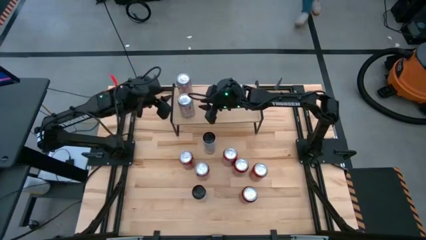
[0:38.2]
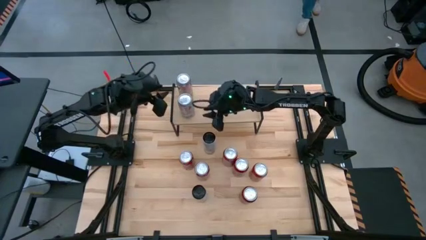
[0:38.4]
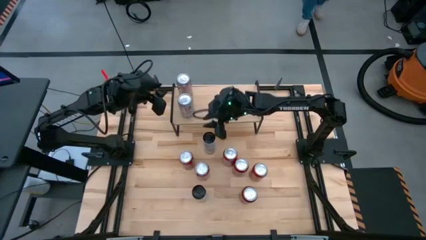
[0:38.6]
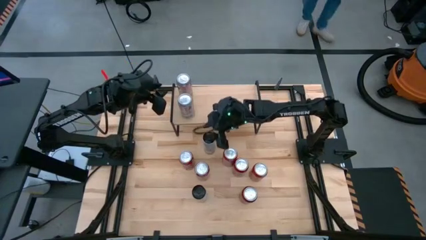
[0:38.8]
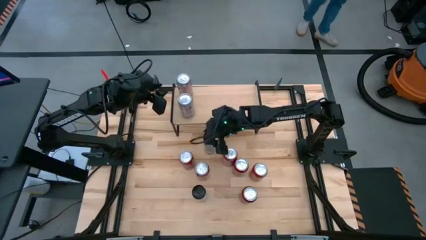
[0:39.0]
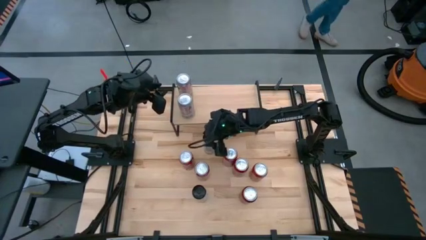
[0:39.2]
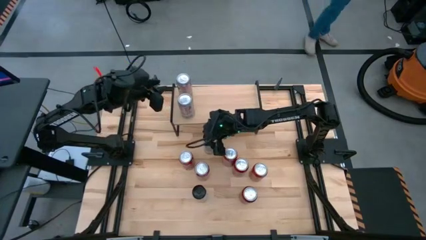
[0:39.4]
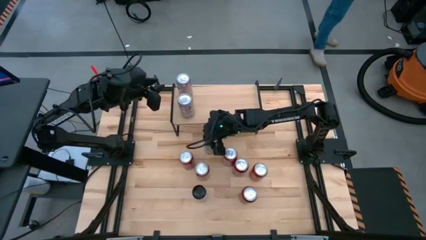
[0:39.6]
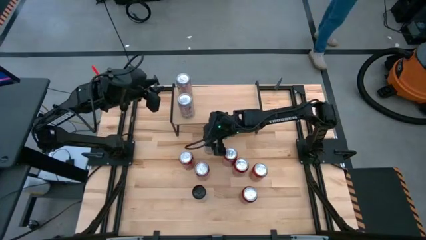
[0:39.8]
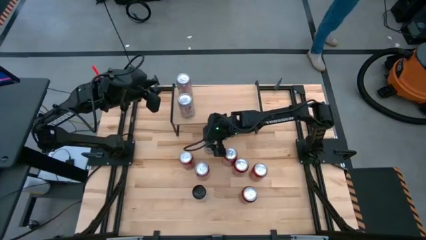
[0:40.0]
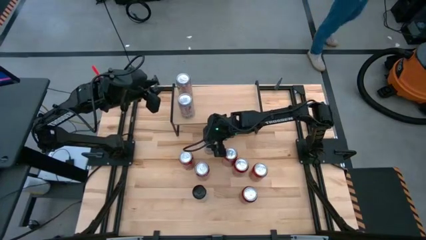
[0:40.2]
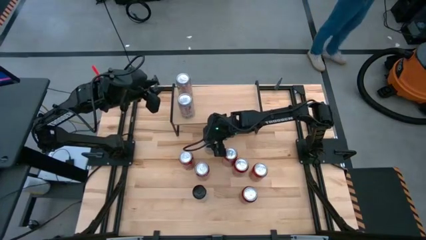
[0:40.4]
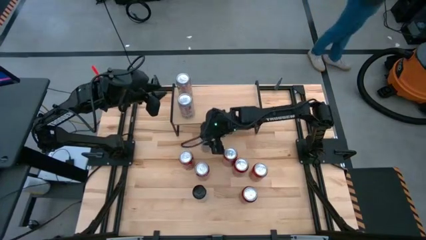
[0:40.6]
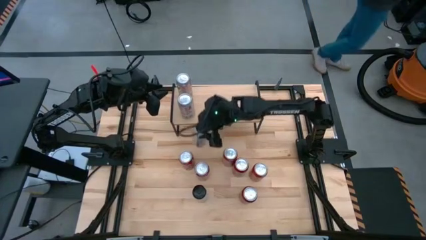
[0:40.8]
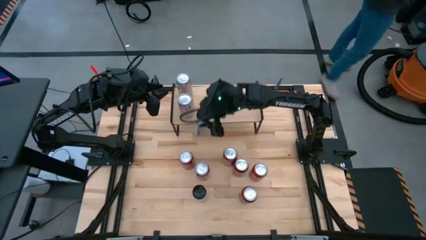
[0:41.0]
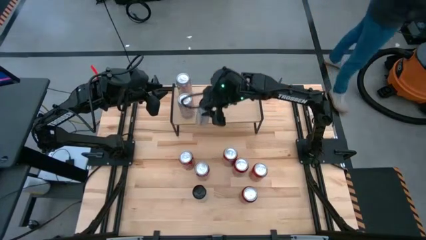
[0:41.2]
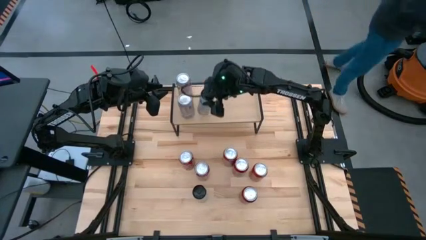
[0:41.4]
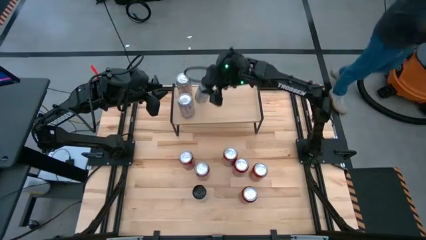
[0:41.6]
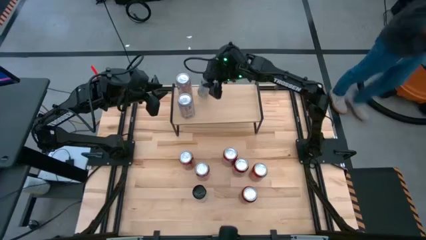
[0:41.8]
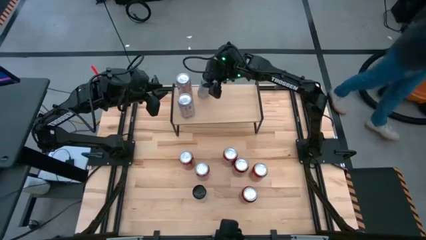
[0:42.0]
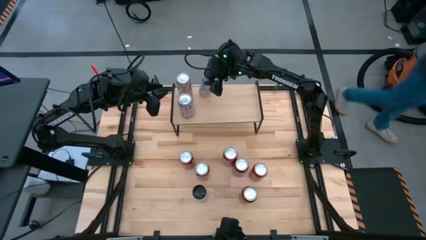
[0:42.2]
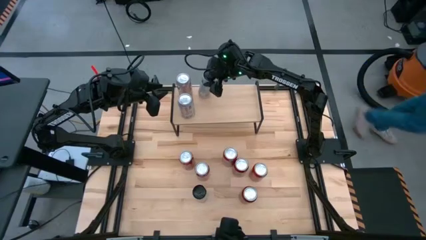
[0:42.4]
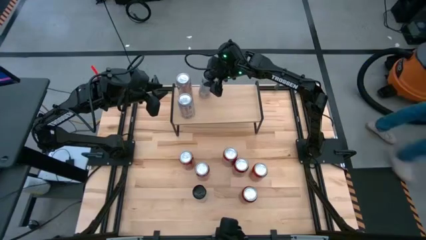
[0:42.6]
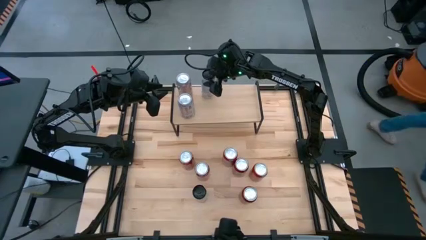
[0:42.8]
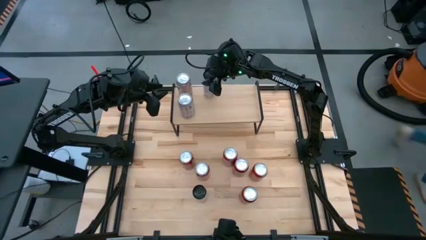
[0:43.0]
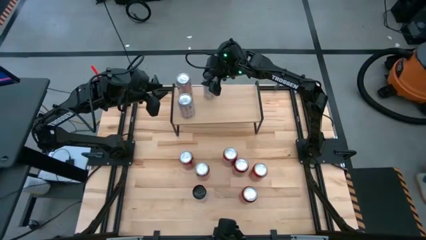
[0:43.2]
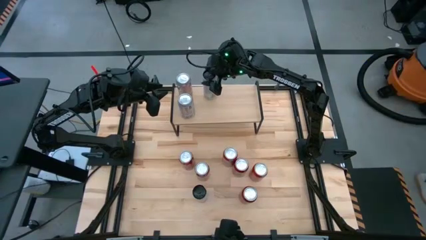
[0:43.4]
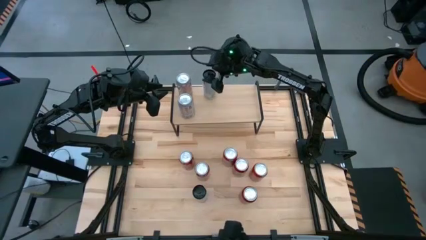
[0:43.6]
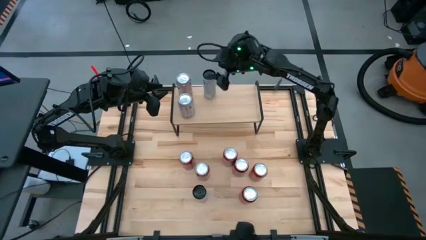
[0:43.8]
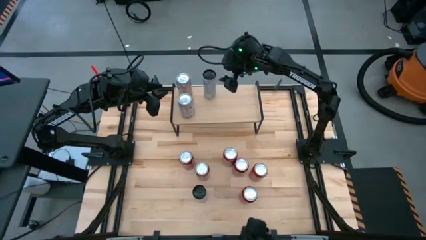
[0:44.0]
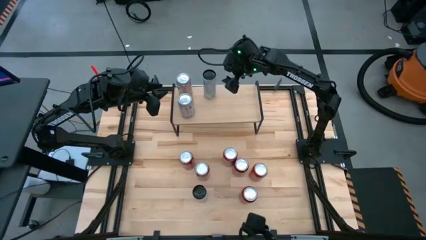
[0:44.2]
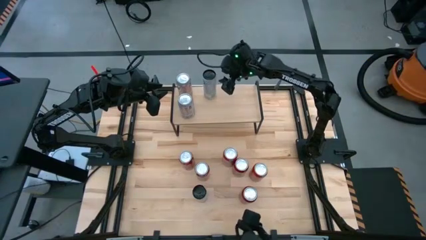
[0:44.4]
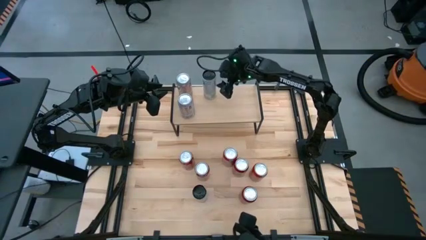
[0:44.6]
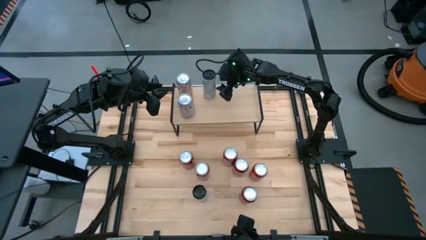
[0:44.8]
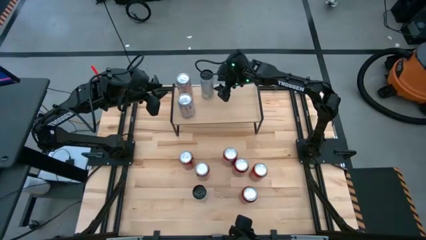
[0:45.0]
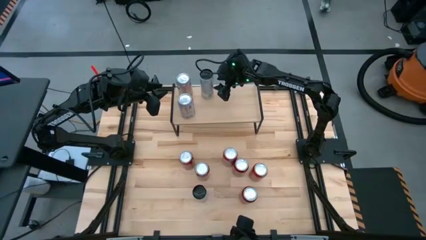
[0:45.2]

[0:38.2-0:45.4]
Task: Place canned beverage on shelf
Put the top white and pink soda can on the shelf

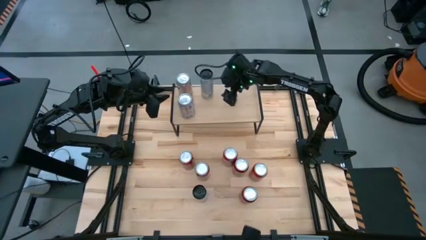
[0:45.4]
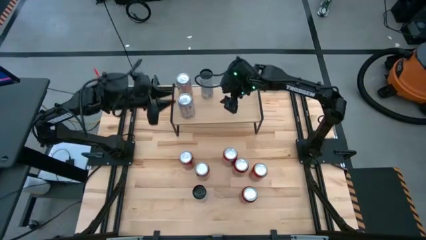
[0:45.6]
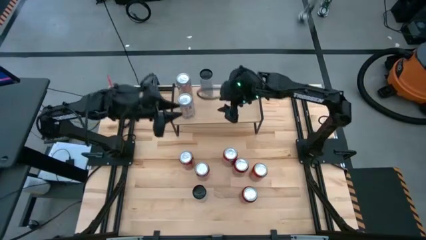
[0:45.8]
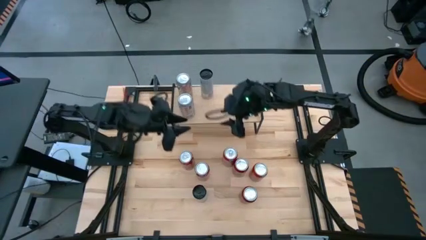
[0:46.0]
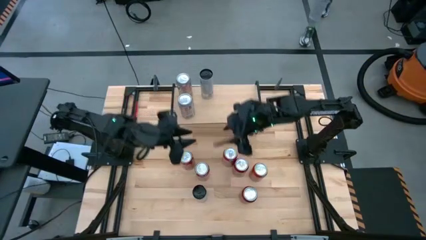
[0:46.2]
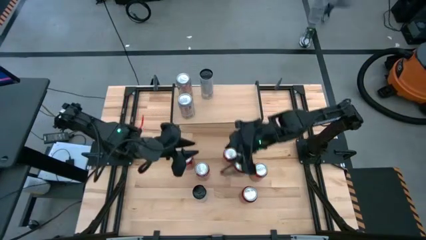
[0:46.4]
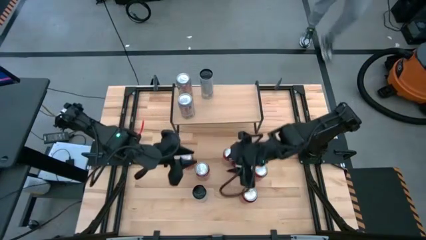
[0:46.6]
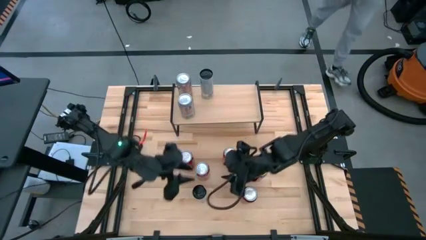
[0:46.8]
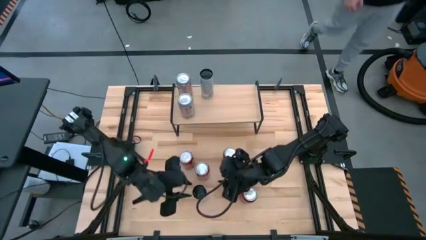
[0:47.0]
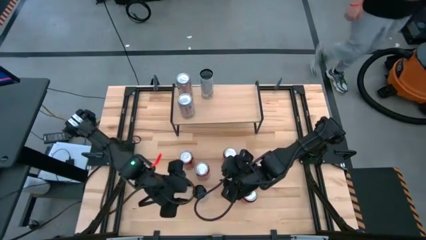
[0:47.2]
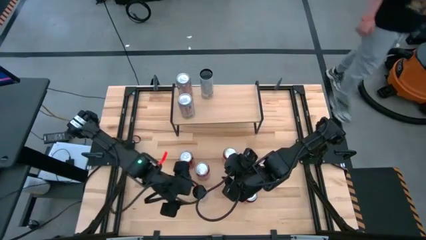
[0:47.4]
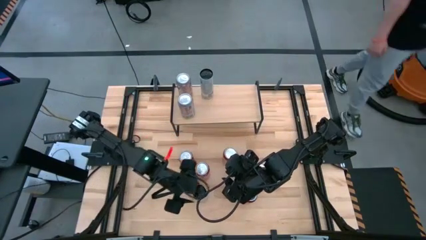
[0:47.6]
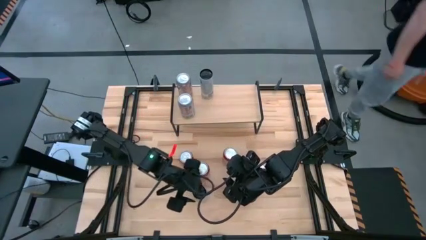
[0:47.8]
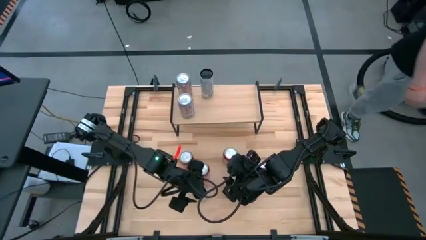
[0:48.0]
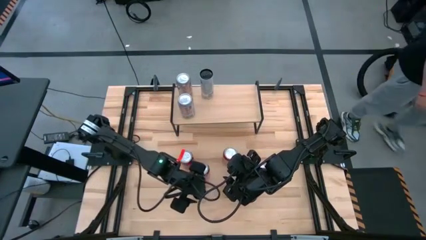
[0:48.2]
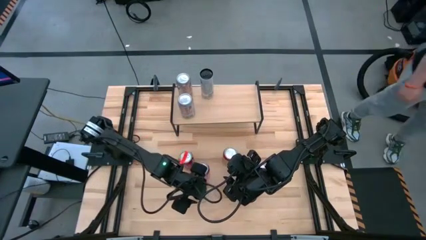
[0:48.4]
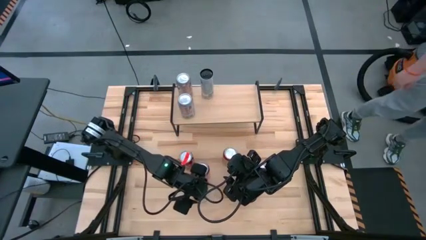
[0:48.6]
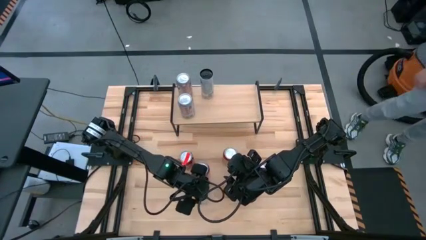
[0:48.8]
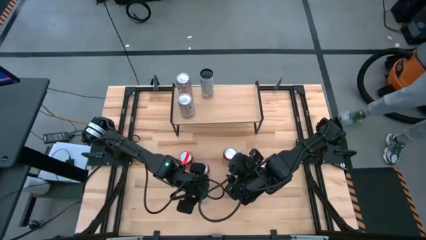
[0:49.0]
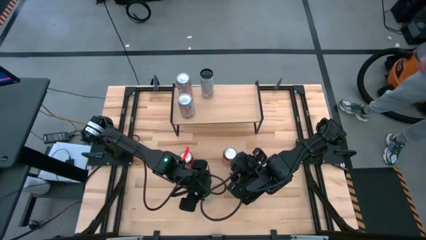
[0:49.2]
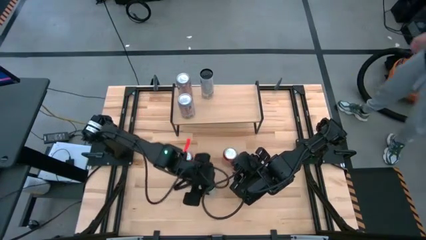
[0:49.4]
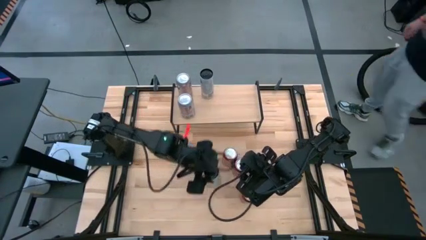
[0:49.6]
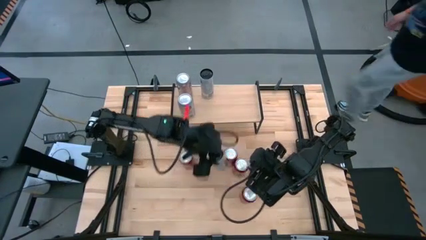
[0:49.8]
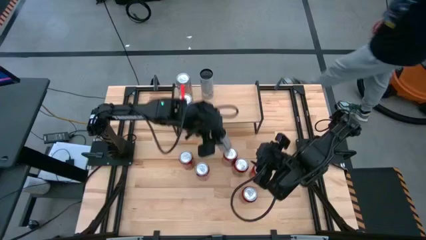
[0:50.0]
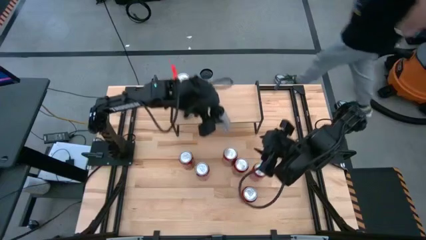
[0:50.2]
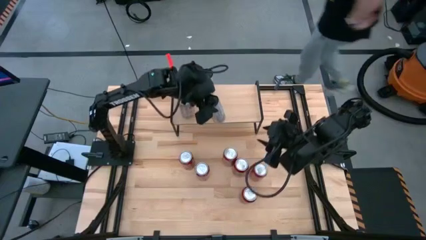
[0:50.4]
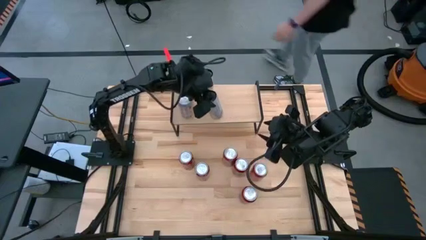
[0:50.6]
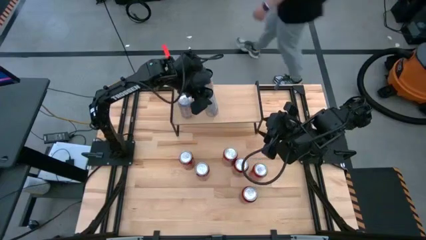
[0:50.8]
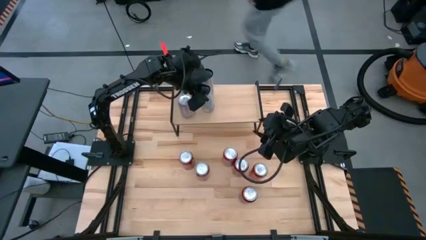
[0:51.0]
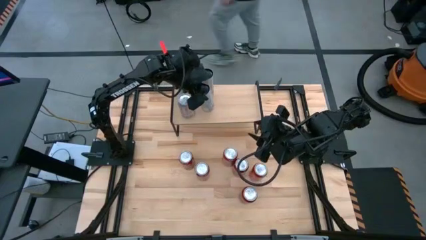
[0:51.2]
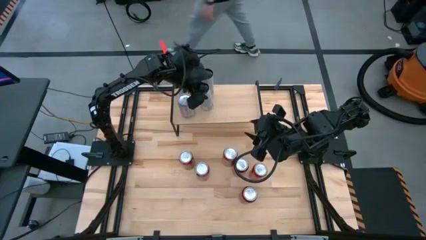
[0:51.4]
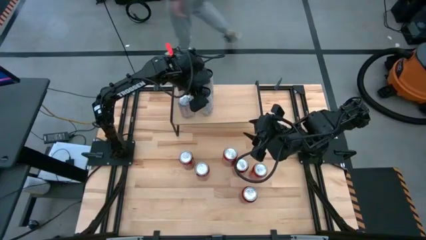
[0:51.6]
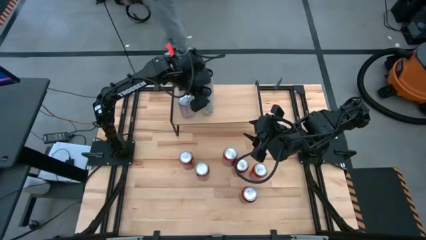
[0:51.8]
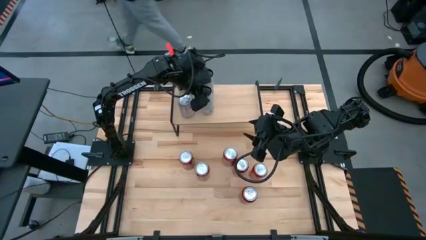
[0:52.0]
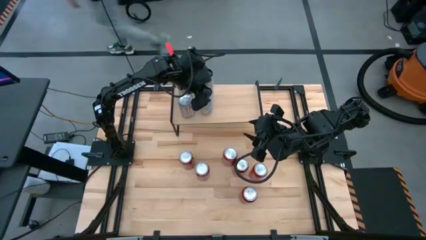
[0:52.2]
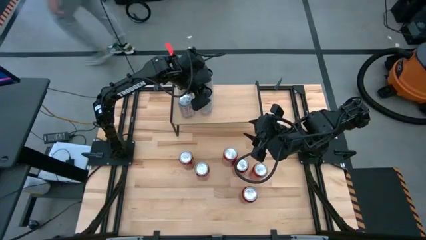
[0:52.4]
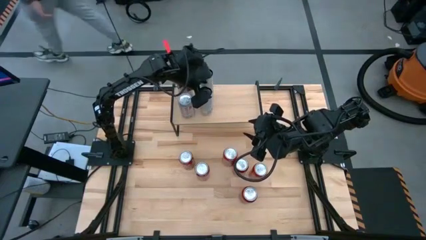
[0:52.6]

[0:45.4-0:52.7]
Put the white and pink soda can aligned with the other white and pink soda can on the shelf
